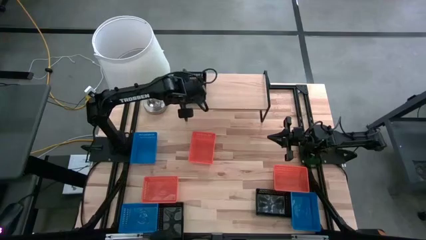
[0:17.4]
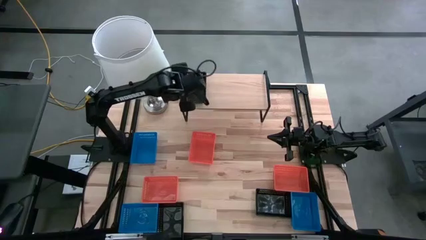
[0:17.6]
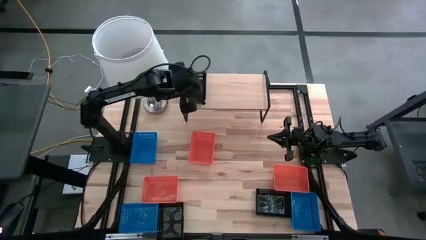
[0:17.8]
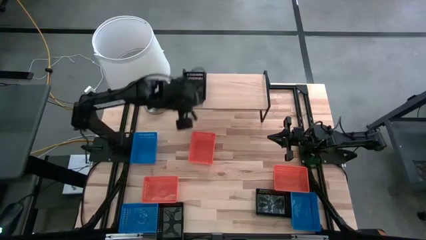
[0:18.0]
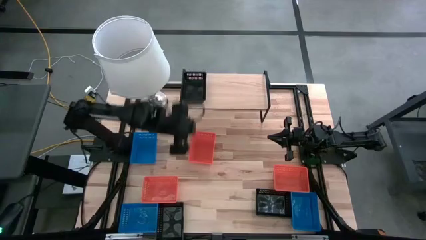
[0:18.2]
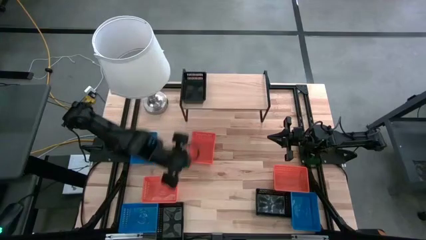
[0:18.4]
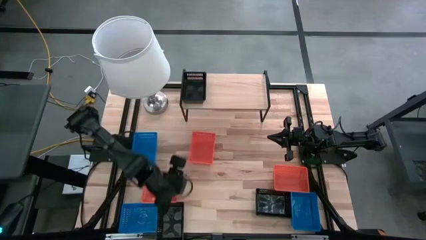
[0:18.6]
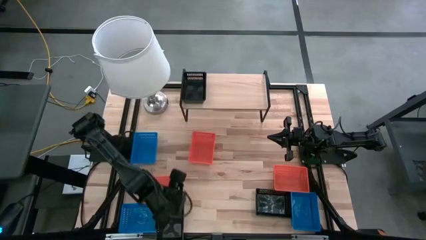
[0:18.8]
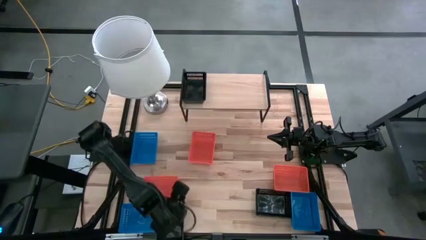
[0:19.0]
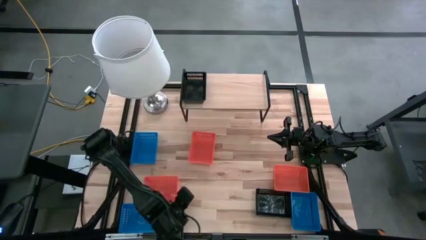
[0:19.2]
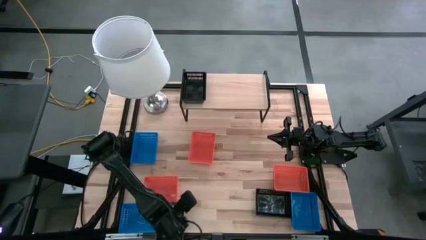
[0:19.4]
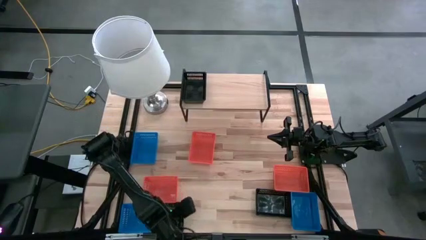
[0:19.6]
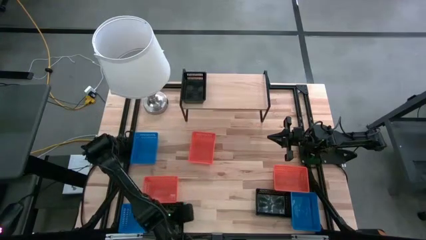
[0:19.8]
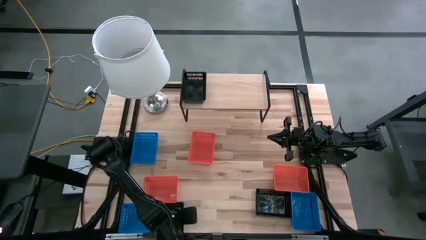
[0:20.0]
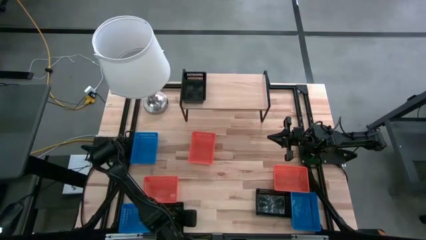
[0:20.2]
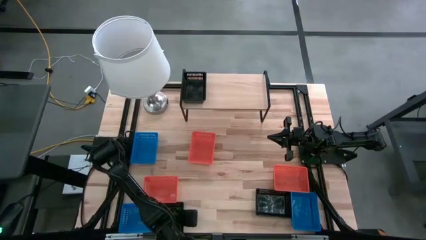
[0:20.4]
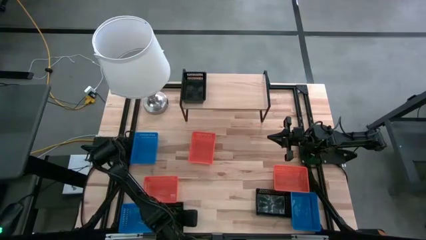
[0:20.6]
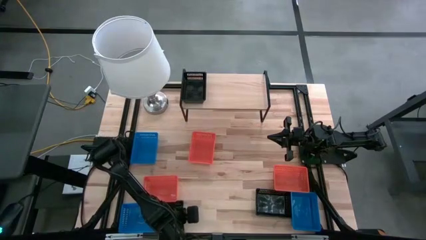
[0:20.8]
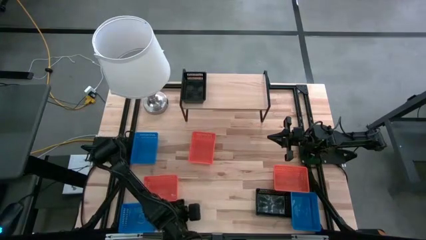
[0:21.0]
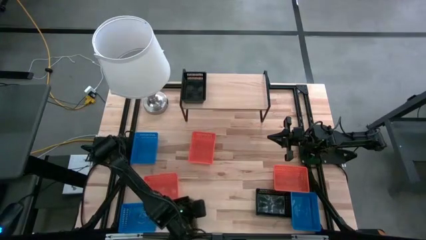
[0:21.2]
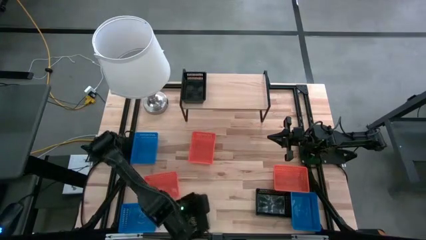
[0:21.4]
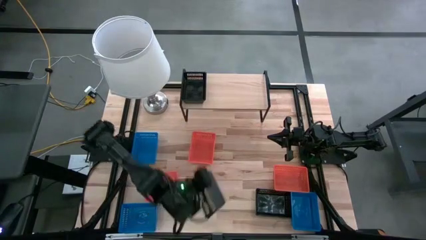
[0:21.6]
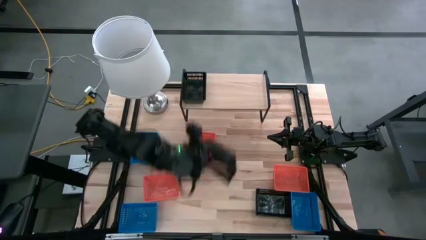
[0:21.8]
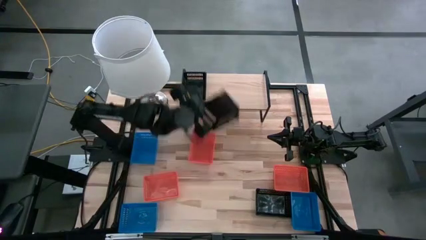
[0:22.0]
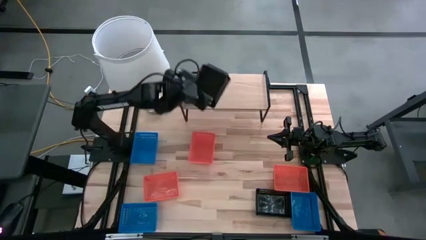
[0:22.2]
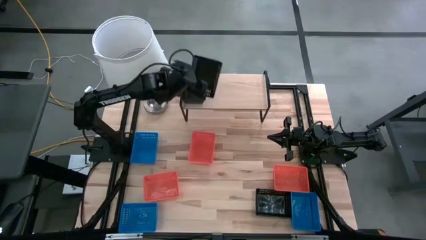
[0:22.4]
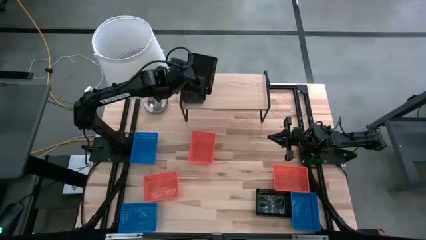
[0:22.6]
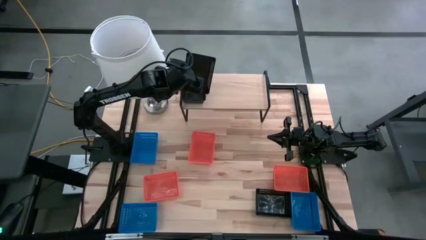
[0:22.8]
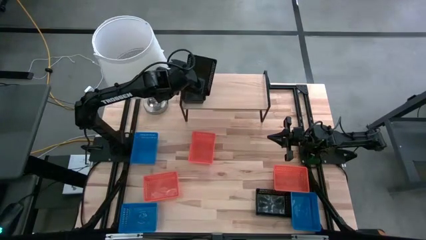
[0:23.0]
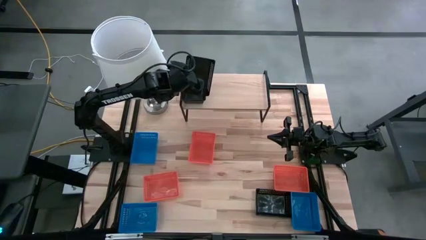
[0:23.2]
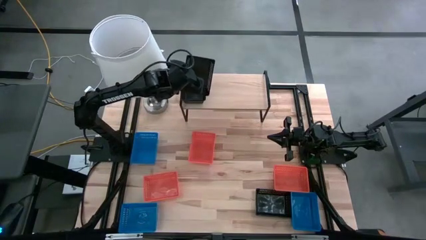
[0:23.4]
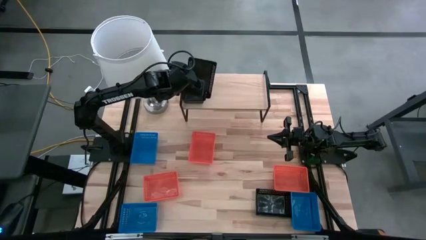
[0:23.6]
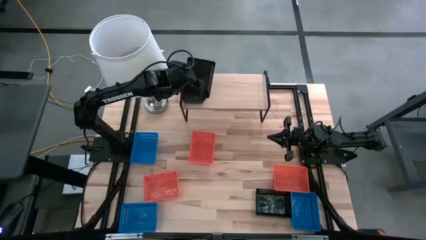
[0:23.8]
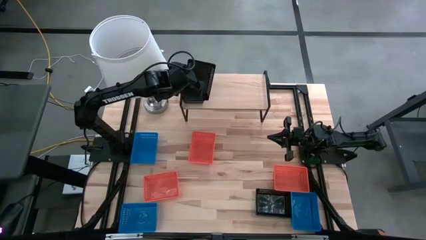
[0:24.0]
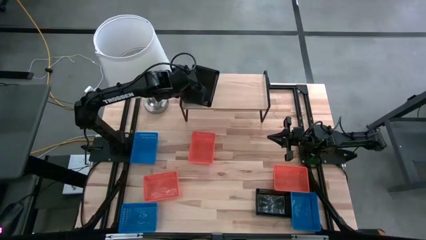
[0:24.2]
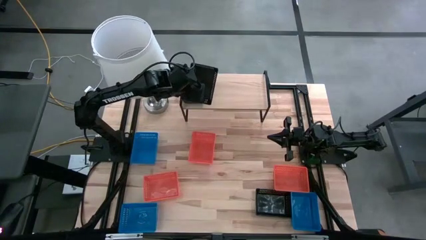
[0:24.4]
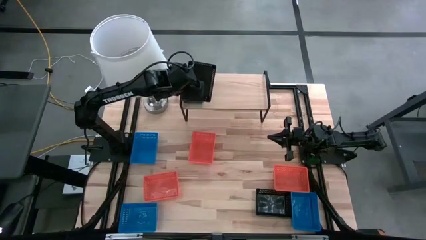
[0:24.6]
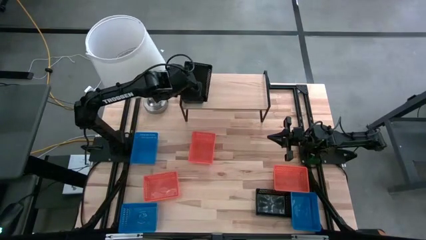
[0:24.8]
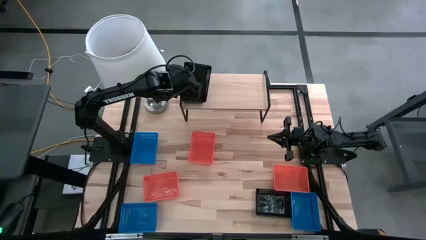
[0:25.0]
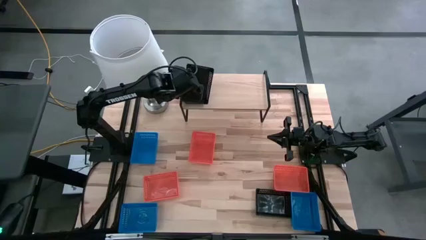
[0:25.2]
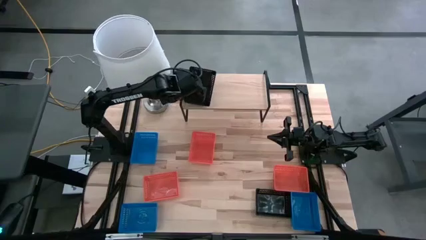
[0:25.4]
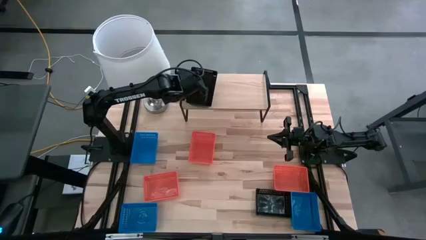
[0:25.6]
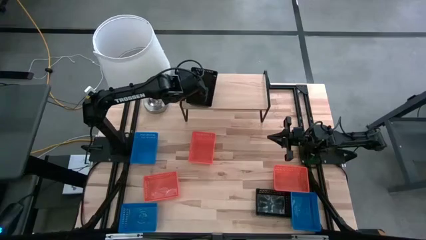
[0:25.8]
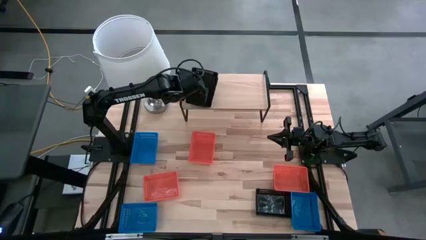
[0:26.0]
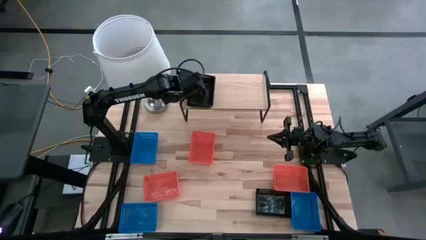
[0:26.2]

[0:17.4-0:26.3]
Task: Stack baskets on shelf by color
Stack the left black bin on top of the black bin on the shelf

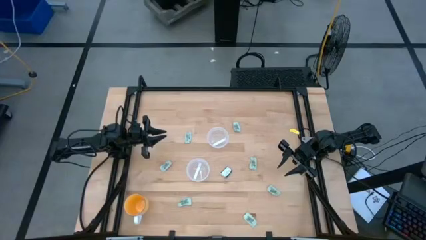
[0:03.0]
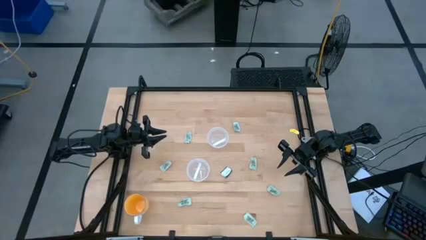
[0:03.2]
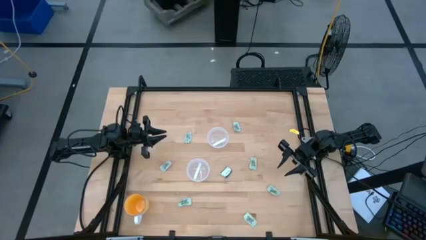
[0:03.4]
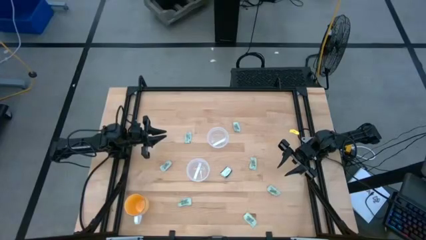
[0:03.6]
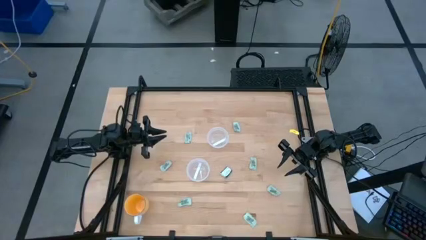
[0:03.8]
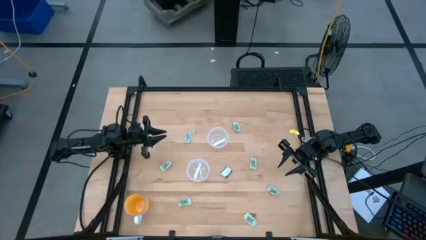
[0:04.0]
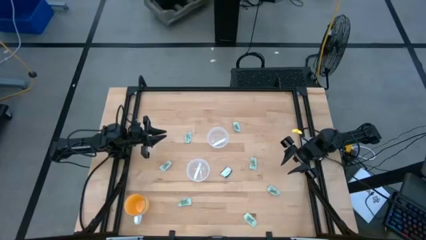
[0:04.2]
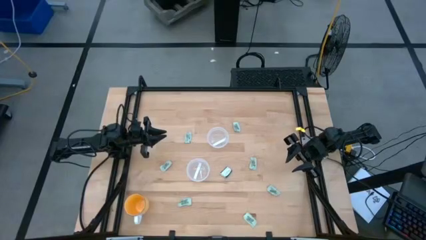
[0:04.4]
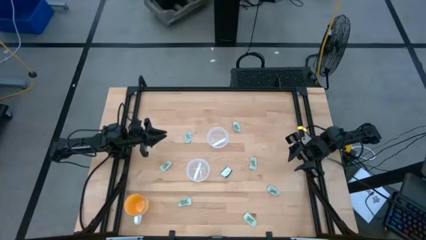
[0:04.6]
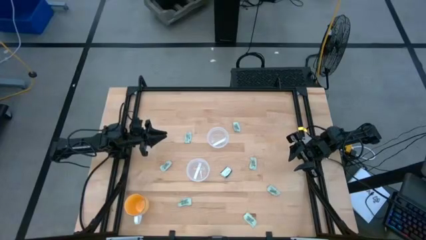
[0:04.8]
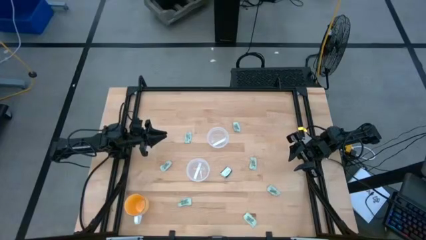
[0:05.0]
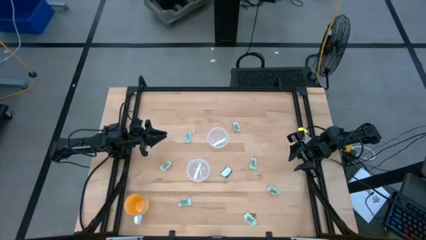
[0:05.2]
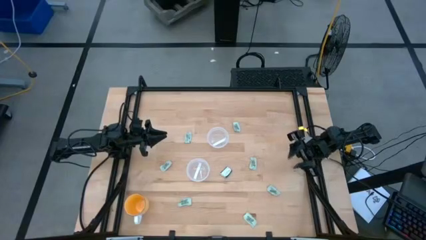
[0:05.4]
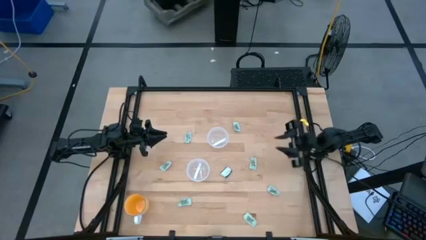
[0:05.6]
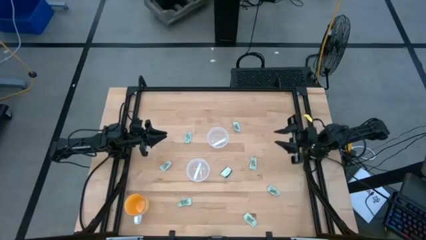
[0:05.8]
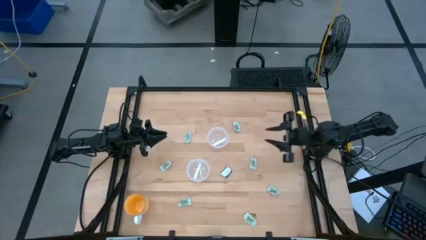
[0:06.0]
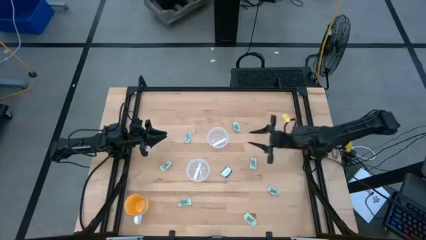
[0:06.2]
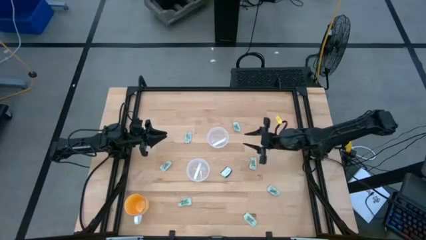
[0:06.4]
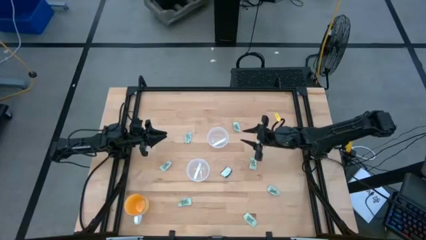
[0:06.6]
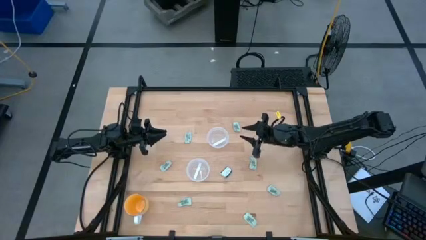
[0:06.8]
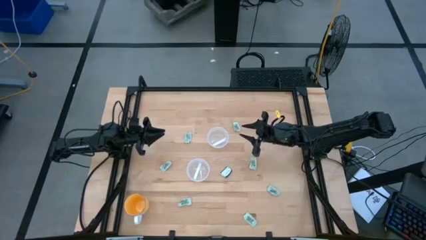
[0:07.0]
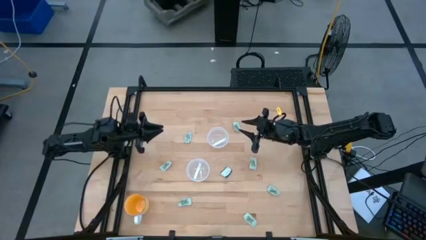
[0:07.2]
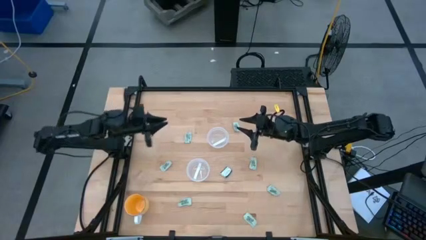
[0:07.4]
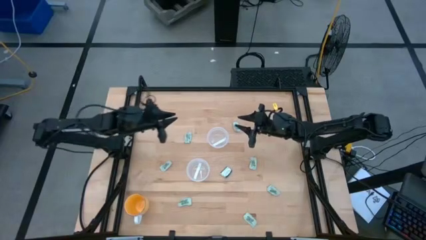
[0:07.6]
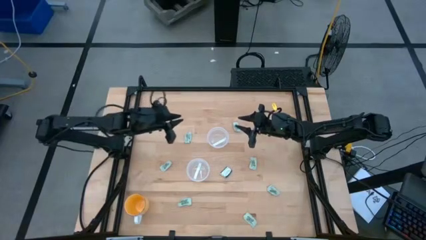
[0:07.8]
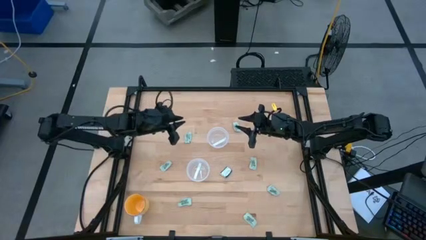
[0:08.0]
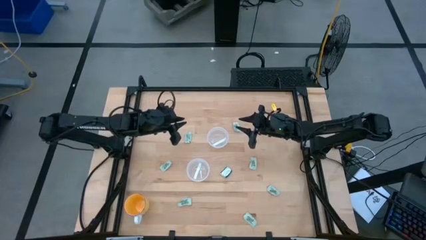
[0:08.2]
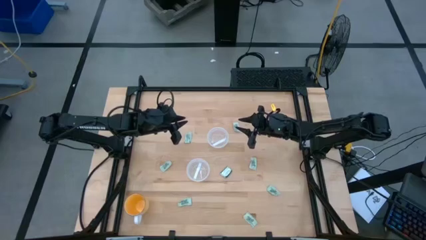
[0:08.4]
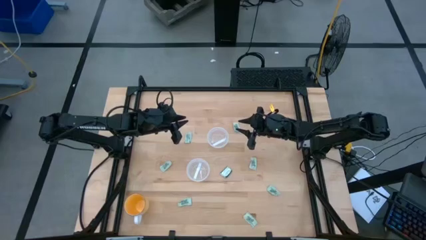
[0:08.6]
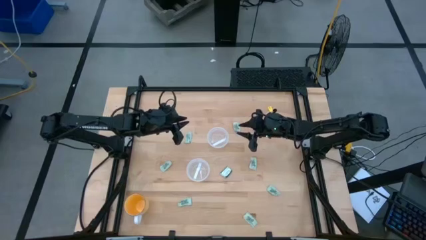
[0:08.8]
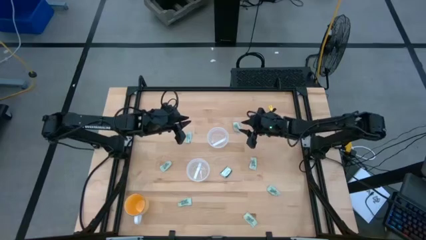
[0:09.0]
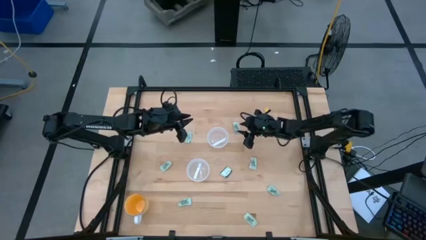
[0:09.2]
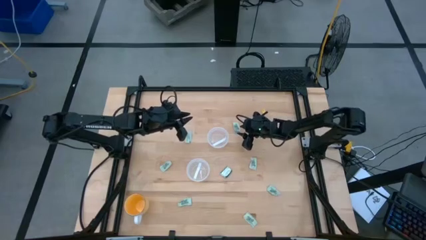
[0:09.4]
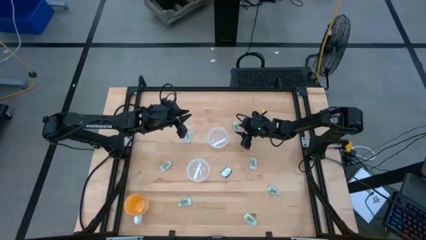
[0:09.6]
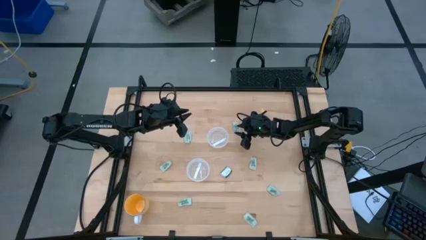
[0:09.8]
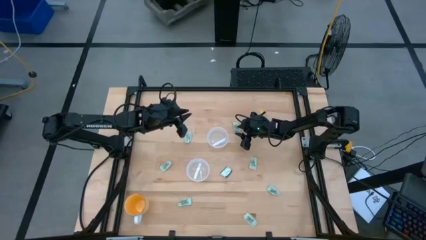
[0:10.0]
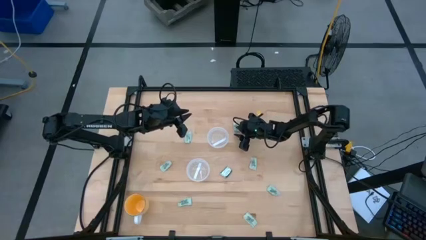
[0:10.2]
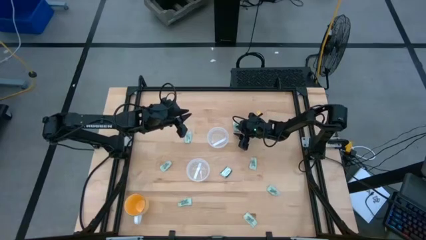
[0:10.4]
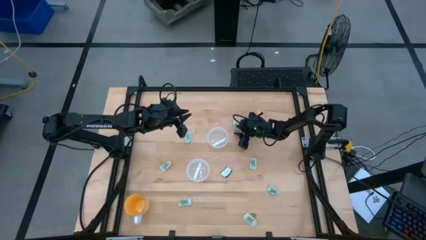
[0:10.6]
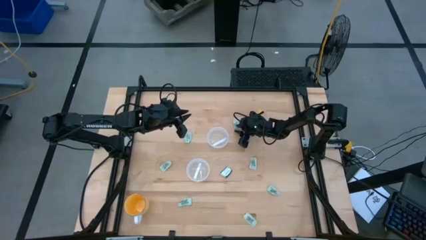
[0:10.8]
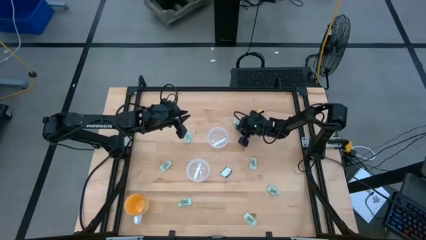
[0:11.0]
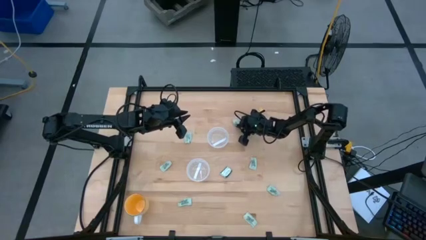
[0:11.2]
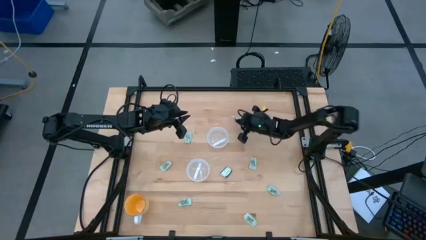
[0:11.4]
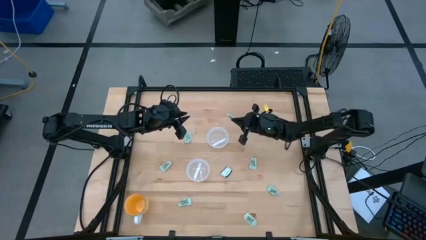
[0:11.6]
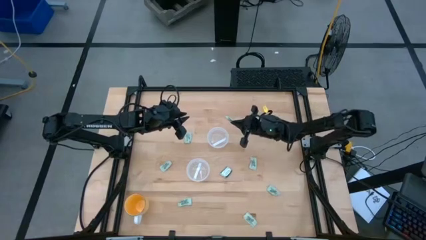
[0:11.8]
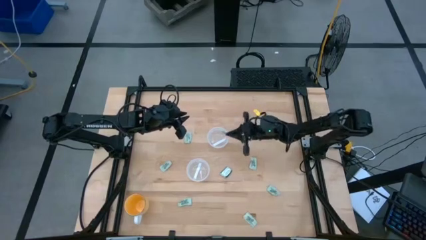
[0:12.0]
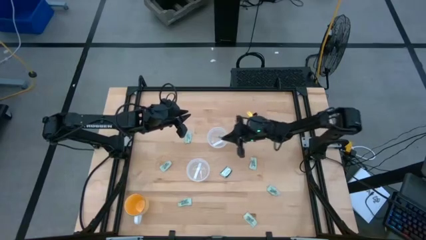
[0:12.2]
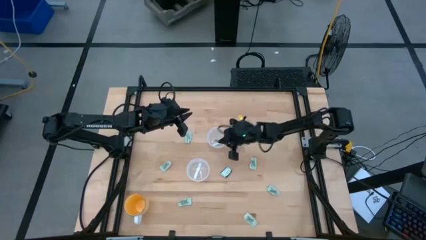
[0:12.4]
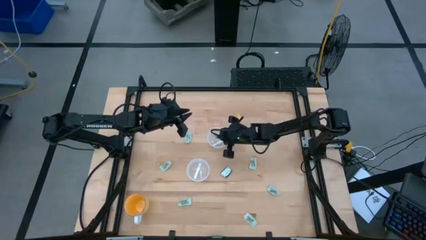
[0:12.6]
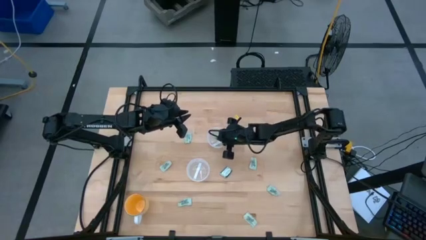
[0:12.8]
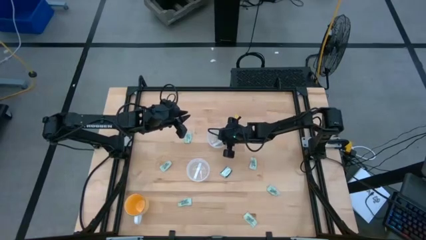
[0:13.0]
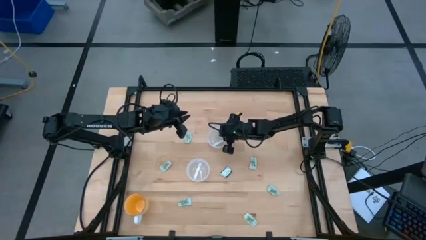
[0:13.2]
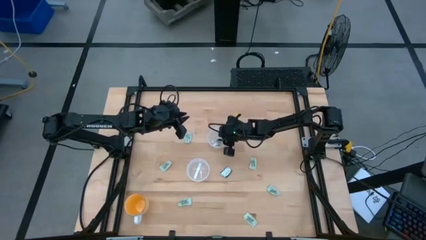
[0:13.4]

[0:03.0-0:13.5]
Task: Pick and place Stevia / Truvia into bins
Put the stevia packet into the top transparent container
